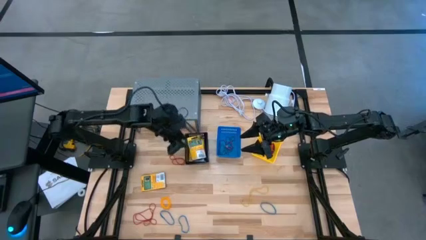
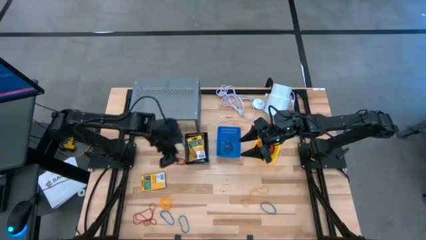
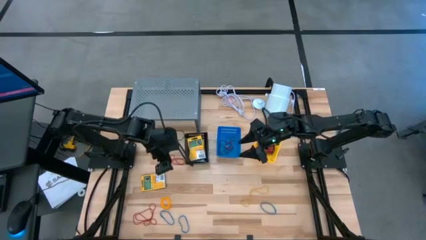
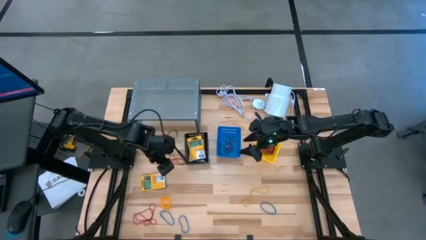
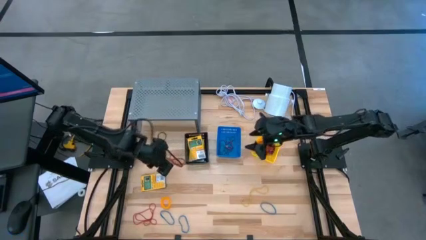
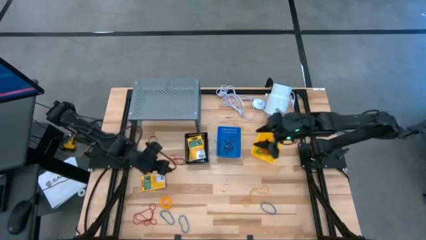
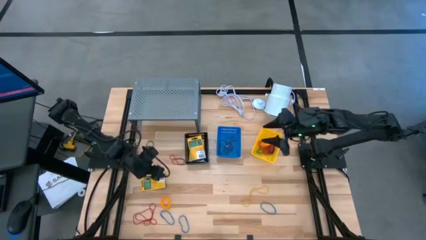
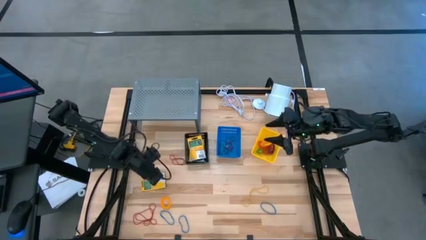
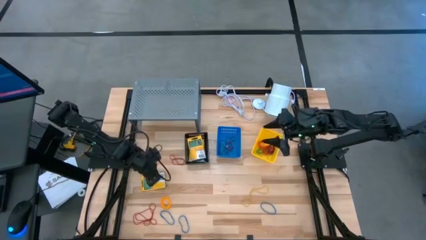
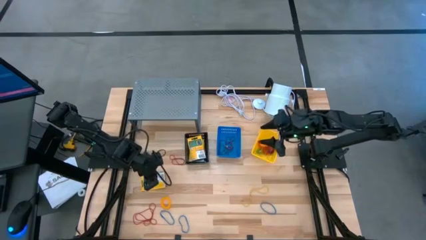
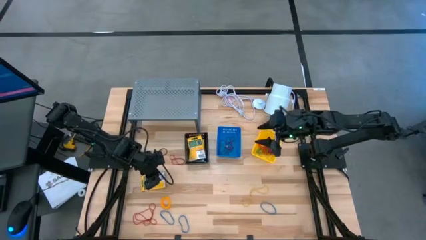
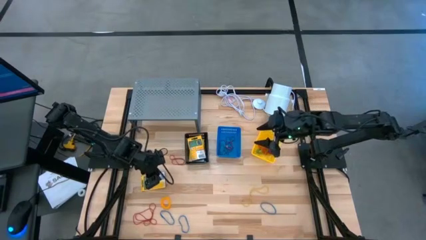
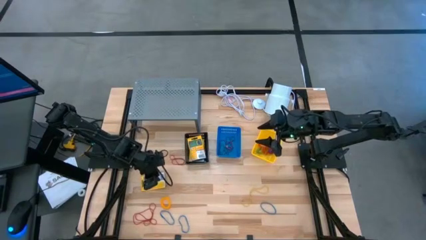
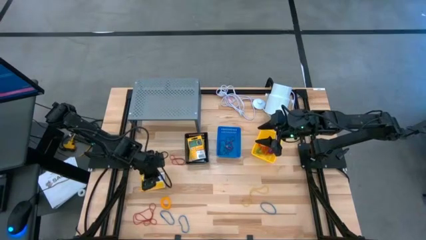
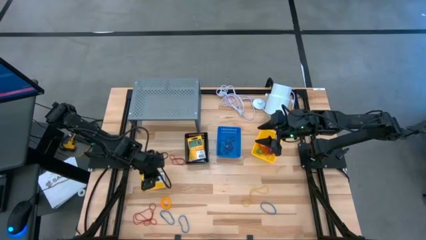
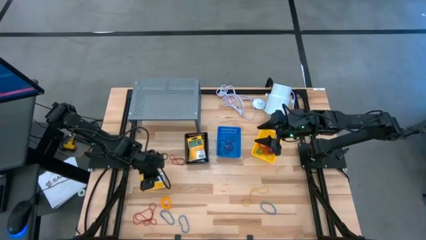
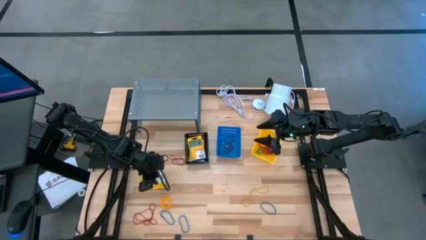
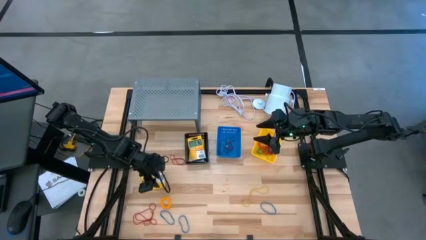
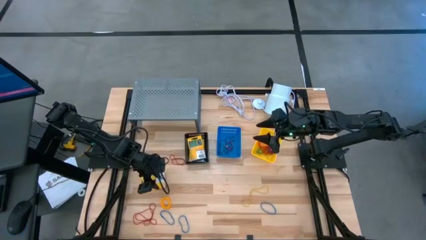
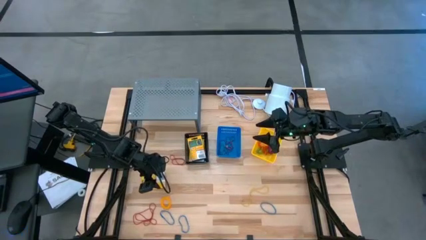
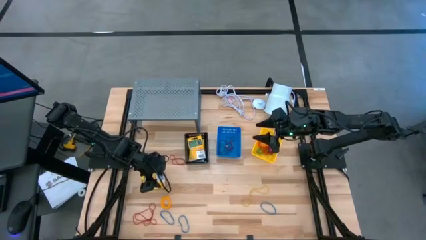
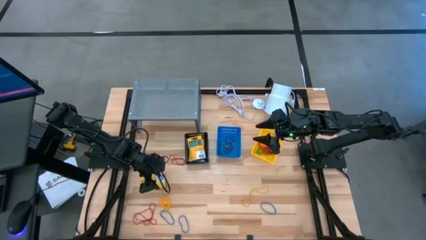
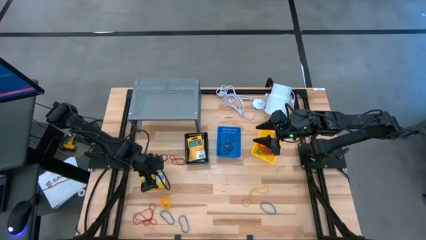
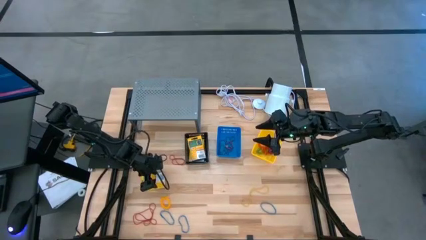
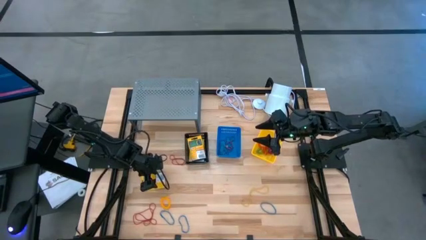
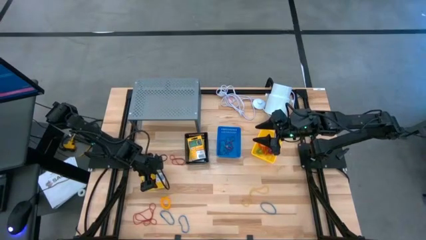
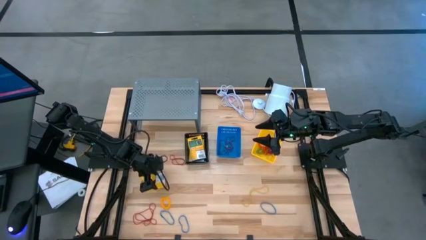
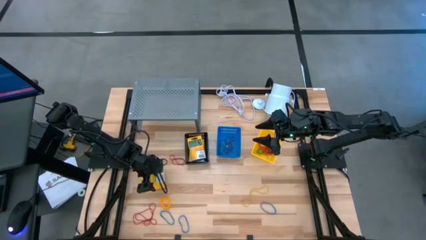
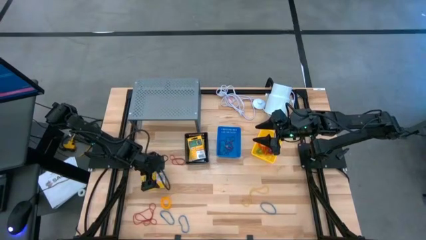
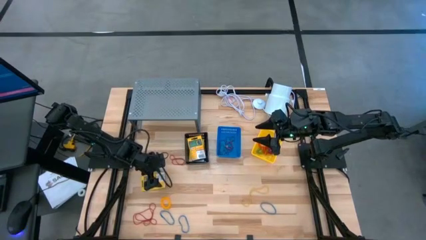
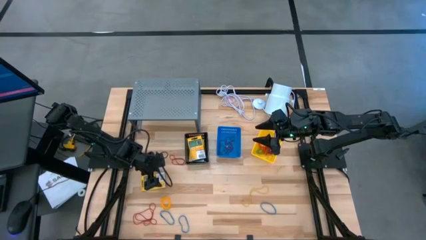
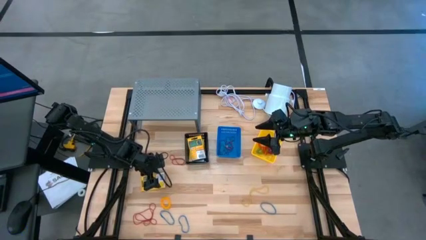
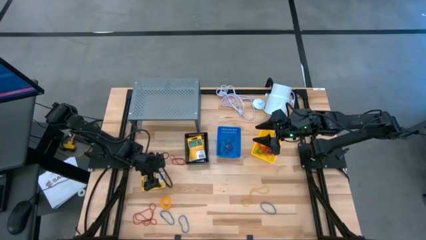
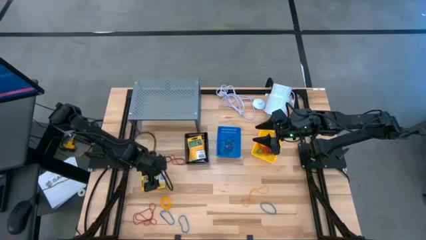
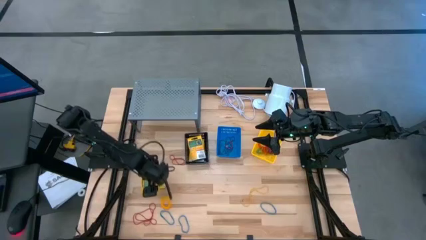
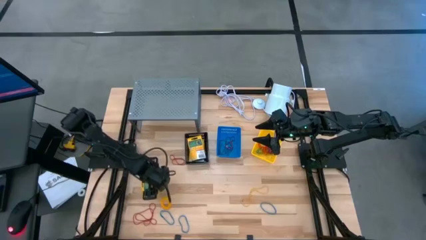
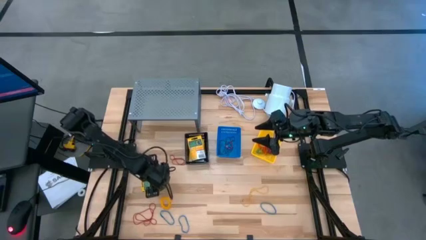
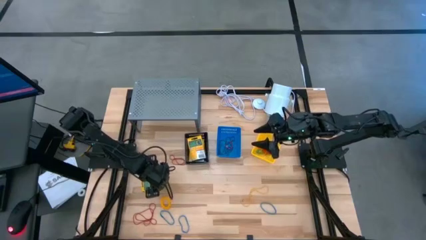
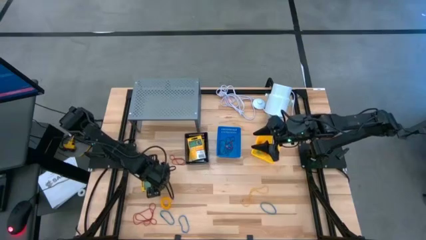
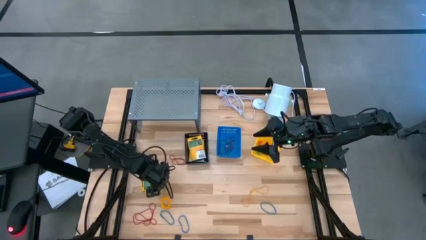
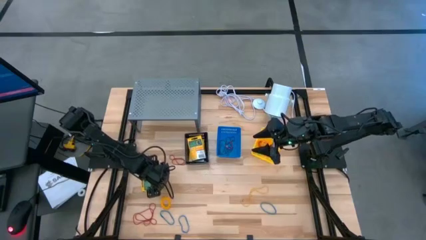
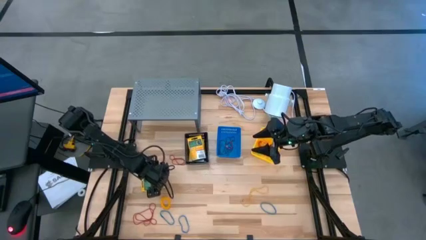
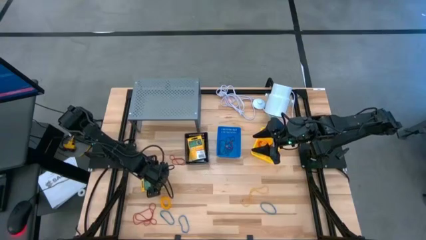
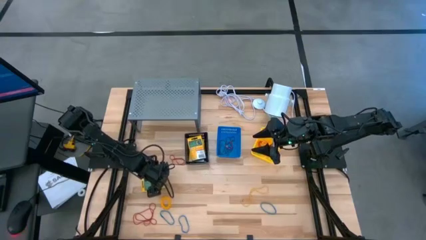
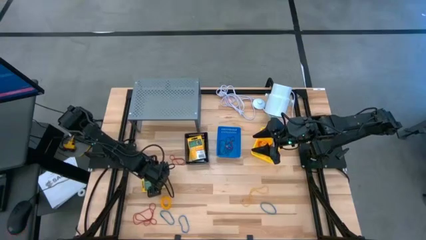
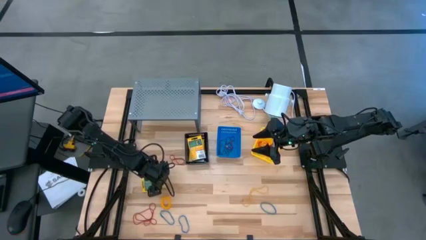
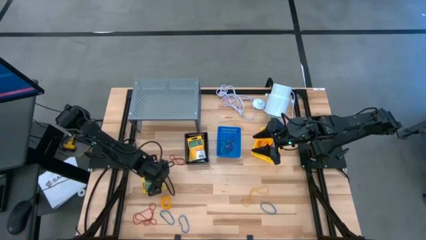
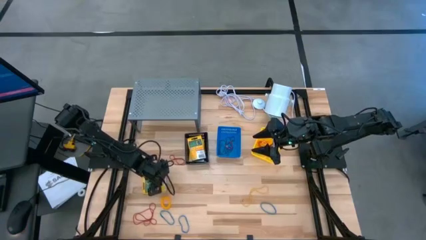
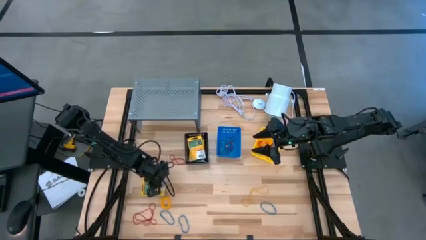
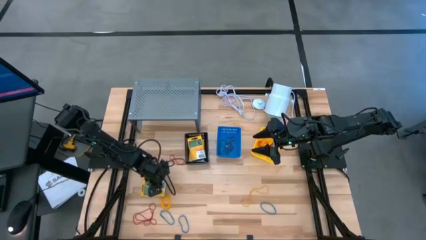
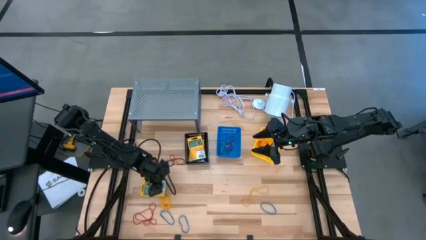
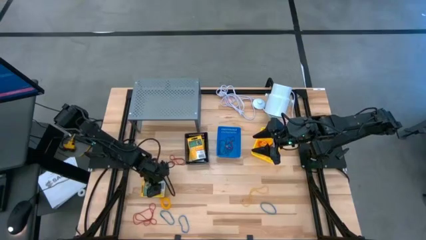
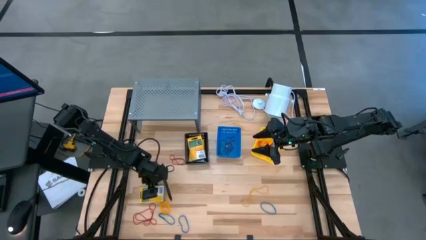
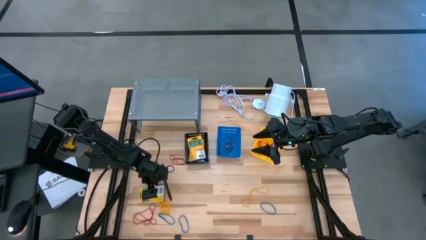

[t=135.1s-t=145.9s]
Task: Pick & Place Office Desk Supplies
Put the crayon box into the black basket
